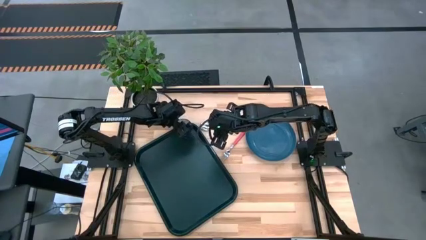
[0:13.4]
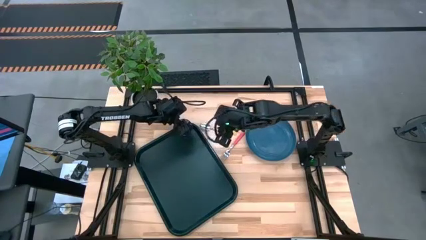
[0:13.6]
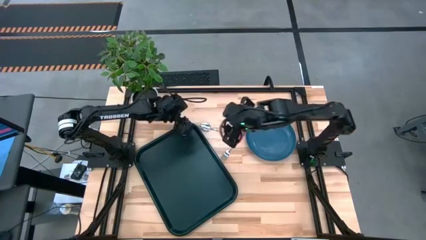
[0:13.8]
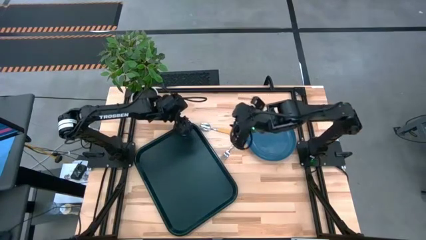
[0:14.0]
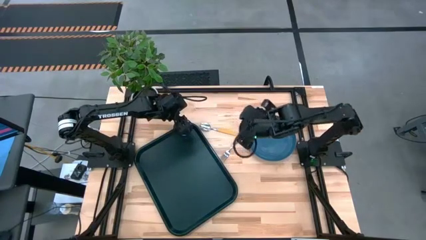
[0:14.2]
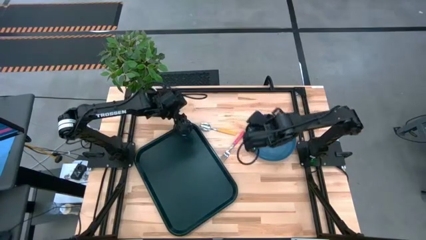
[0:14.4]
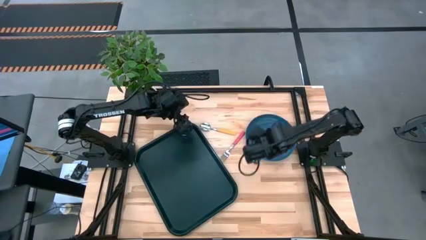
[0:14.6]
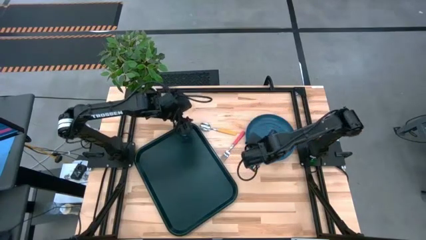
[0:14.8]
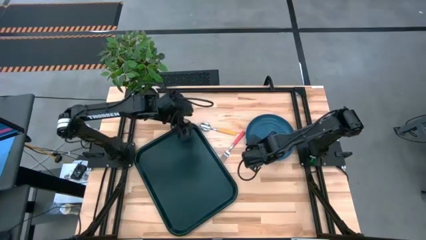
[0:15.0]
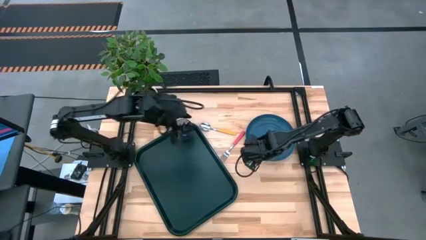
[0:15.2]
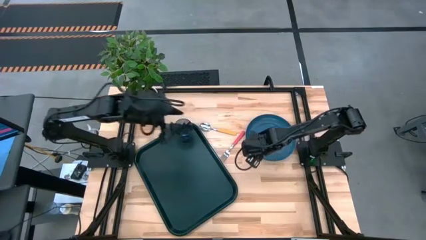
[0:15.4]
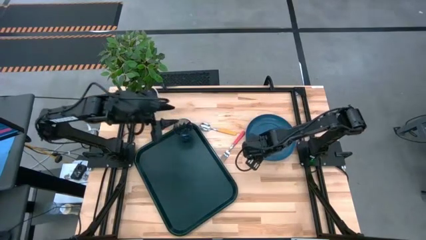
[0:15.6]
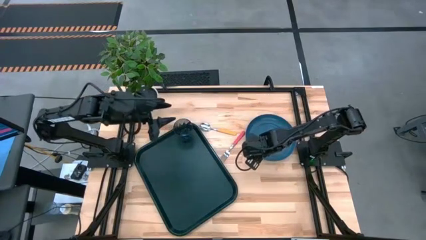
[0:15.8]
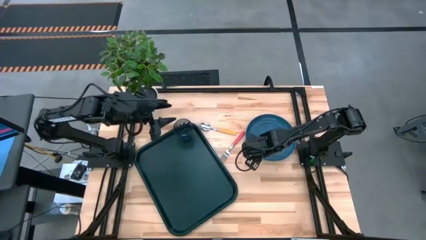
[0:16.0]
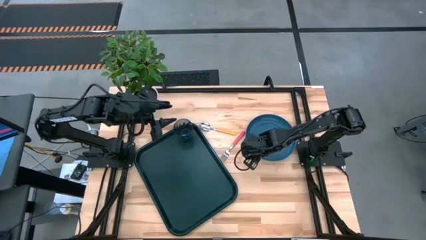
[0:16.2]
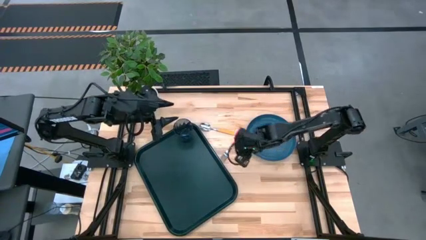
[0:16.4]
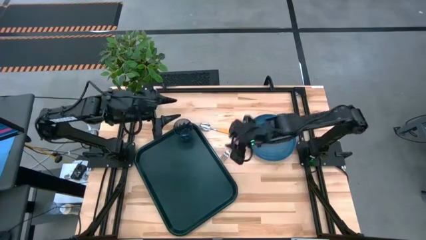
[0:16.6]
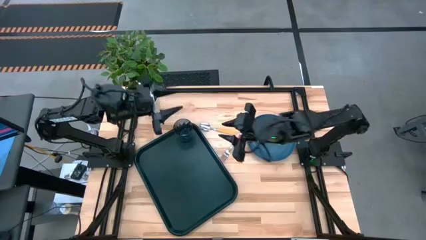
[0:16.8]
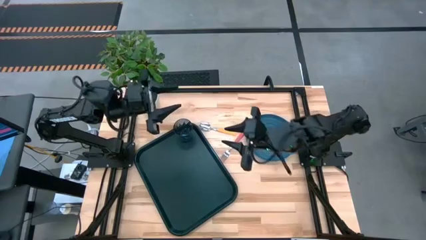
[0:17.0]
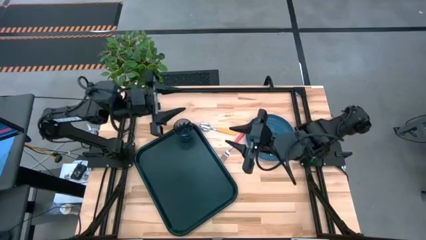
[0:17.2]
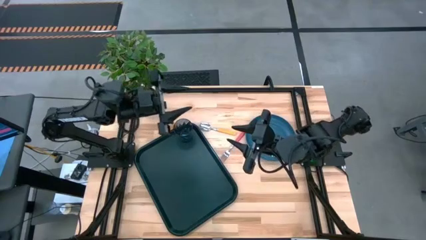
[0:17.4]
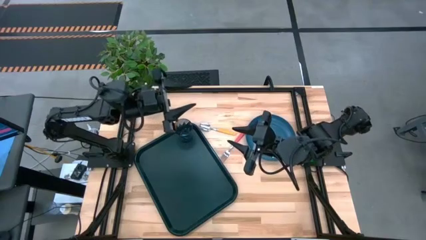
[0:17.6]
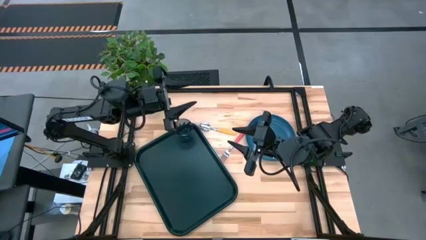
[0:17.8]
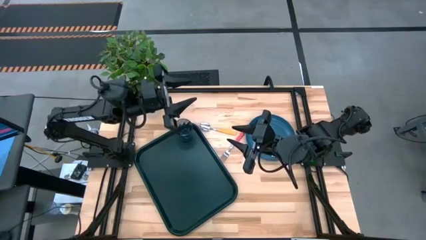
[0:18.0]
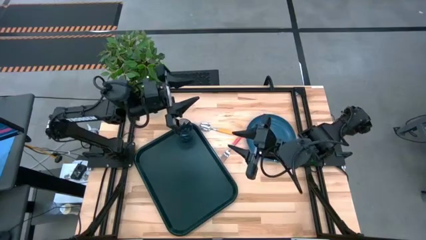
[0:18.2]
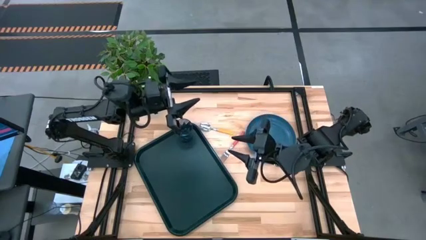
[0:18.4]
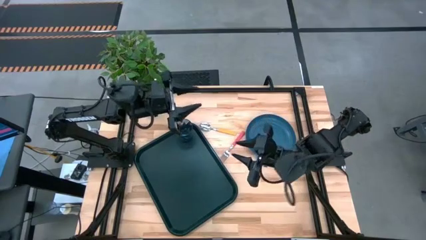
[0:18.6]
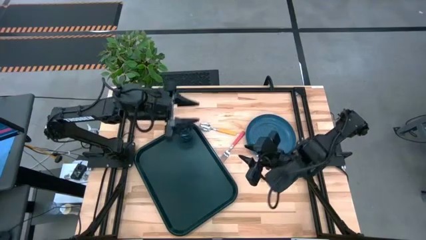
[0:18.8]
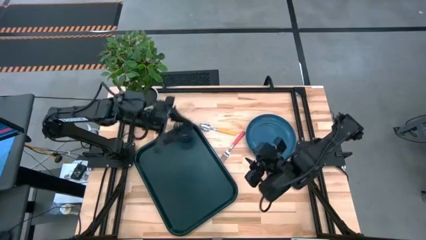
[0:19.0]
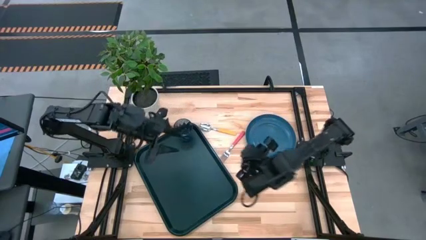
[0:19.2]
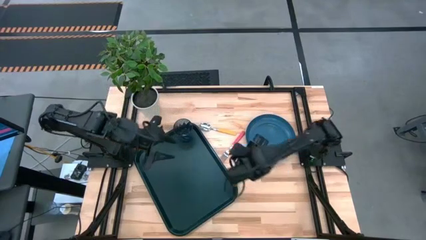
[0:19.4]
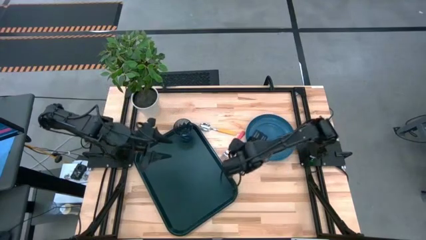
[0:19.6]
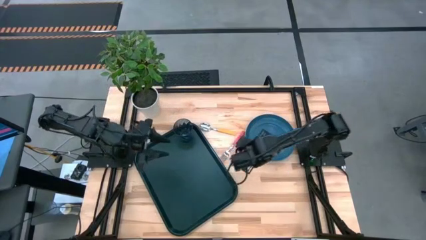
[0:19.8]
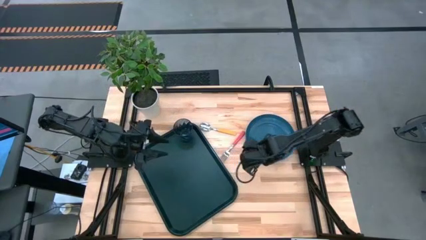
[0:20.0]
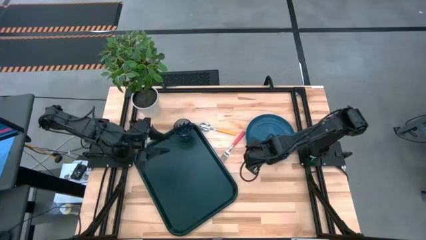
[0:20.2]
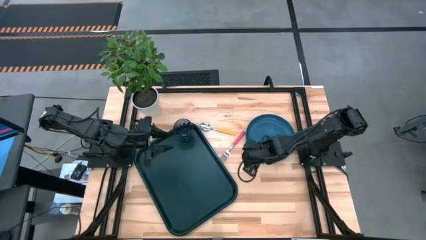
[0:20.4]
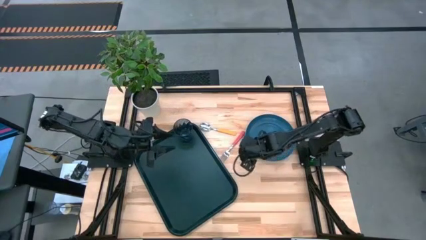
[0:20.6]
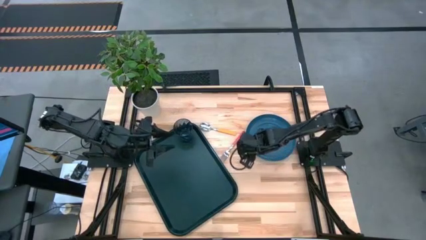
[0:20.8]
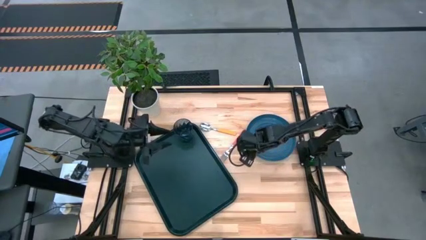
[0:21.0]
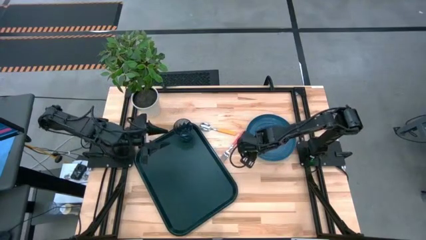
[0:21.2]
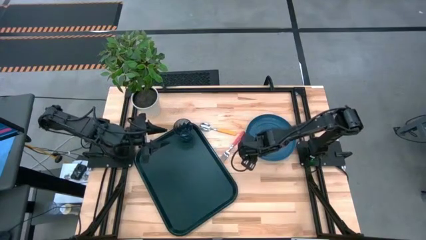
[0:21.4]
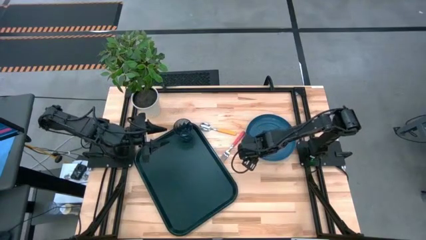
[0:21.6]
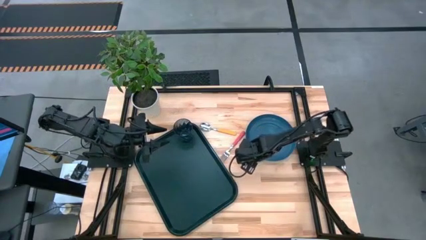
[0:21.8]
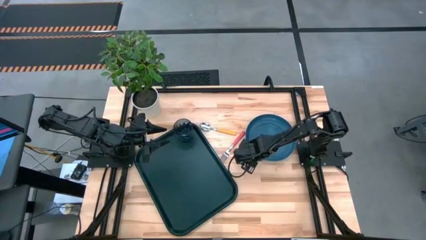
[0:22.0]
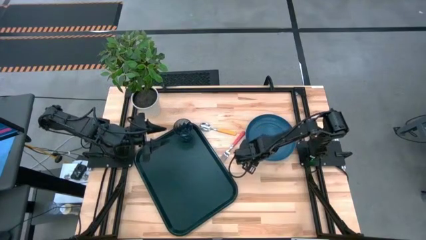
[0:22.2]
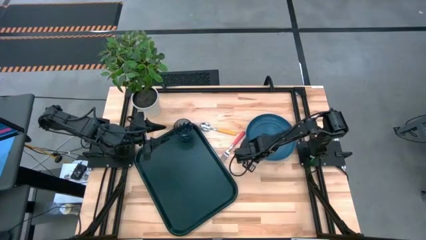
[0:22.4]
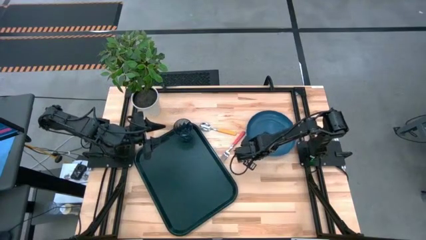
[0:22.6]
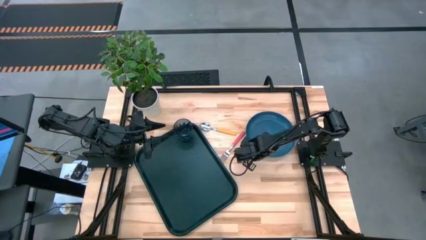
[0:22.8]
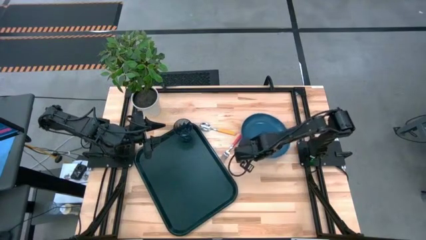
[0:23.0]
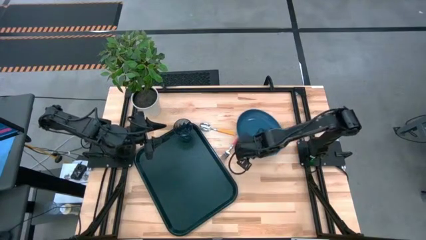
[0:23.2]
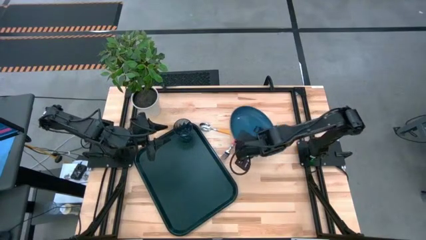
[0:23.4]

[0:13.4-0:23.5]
Task: Pick and place plate/cup/fork/spoon on tray
Put the blue plate on the black tray at the bottom of the blue cup

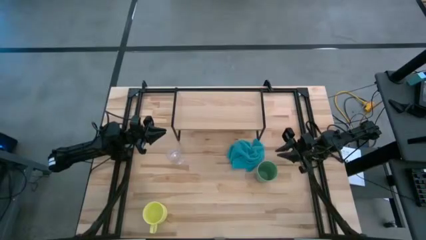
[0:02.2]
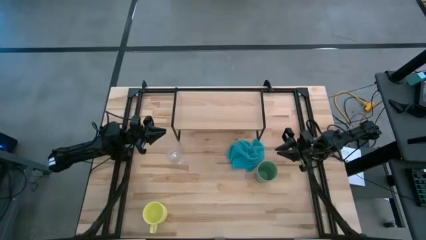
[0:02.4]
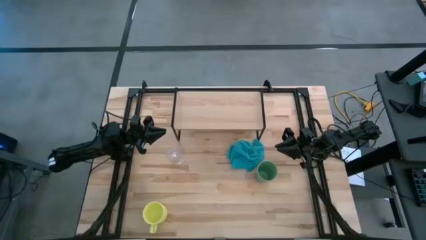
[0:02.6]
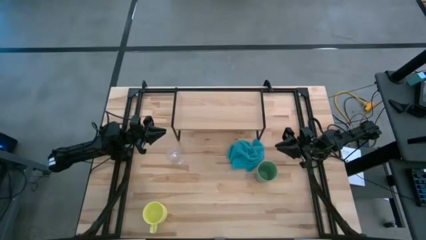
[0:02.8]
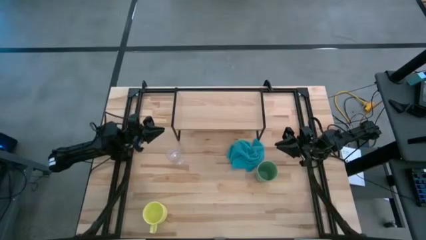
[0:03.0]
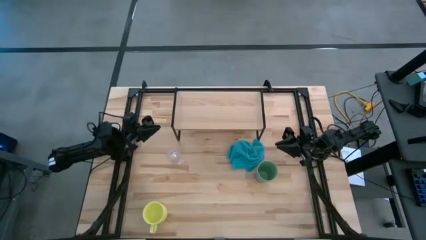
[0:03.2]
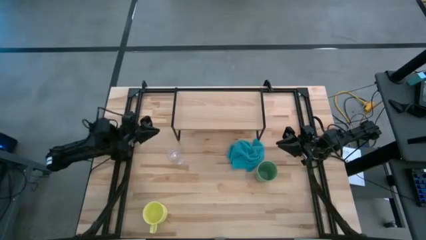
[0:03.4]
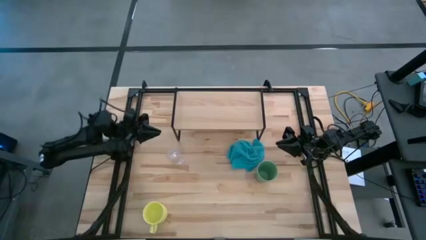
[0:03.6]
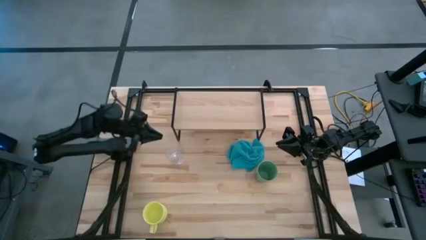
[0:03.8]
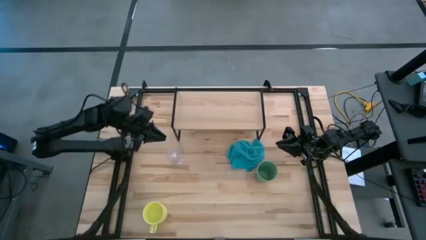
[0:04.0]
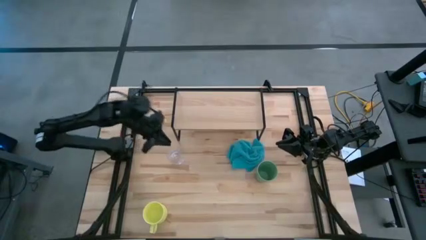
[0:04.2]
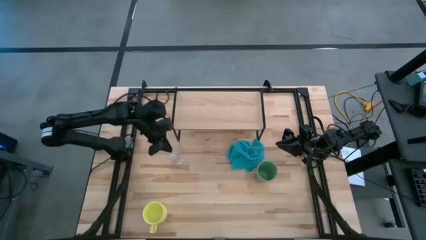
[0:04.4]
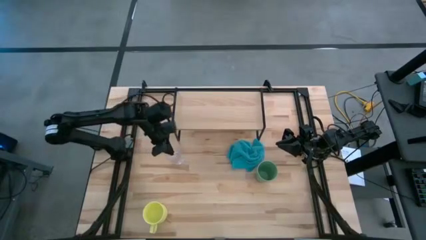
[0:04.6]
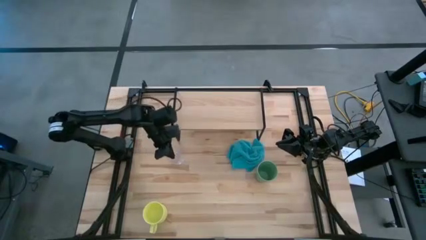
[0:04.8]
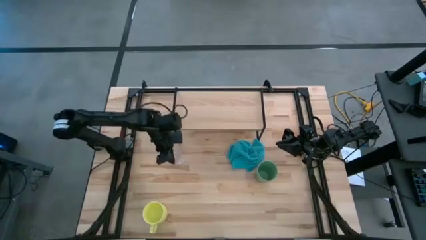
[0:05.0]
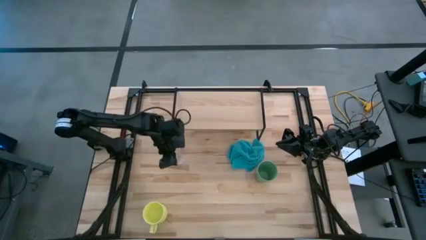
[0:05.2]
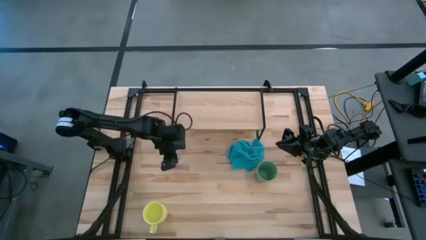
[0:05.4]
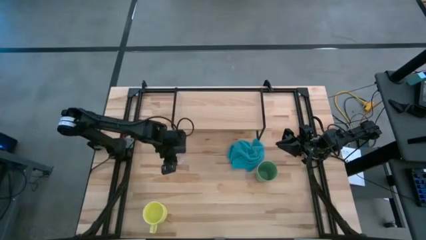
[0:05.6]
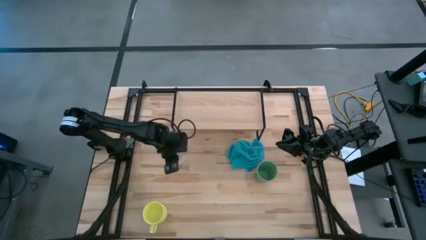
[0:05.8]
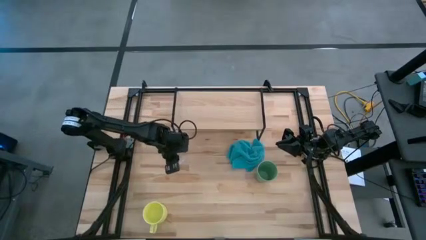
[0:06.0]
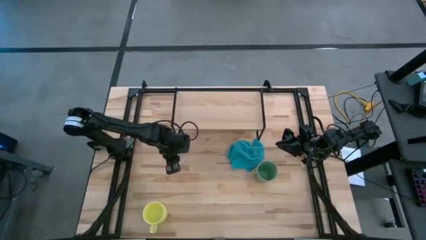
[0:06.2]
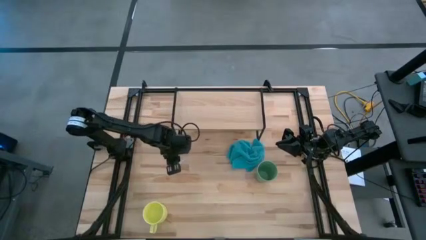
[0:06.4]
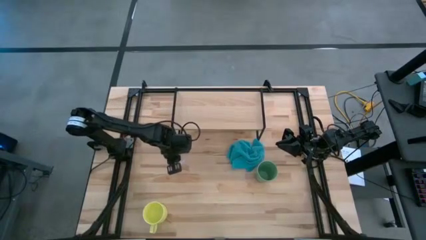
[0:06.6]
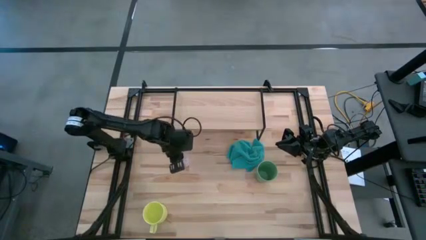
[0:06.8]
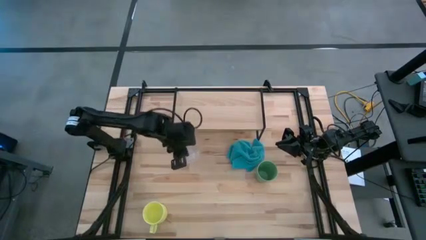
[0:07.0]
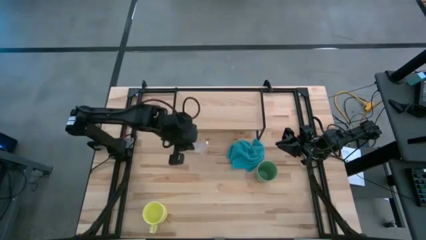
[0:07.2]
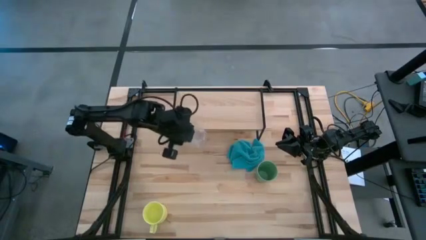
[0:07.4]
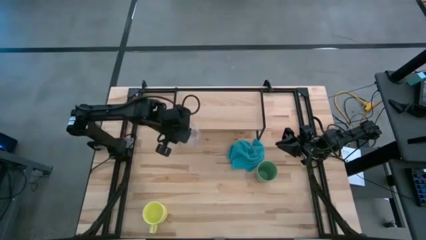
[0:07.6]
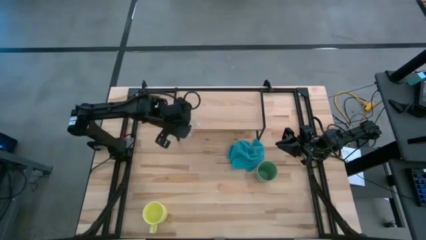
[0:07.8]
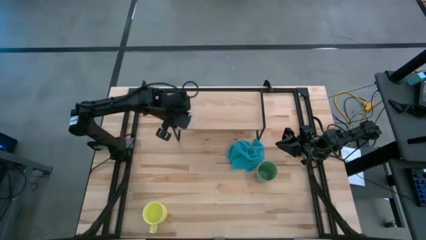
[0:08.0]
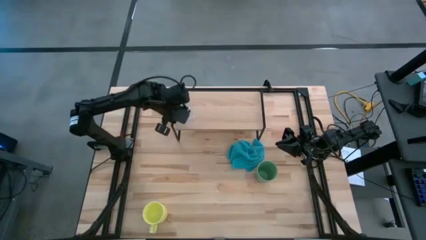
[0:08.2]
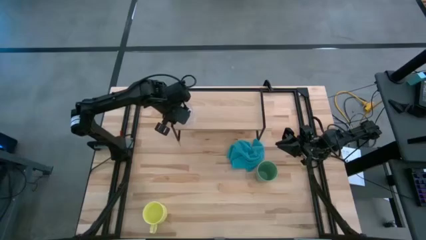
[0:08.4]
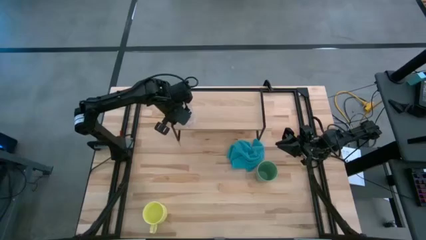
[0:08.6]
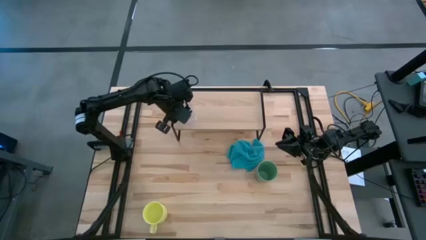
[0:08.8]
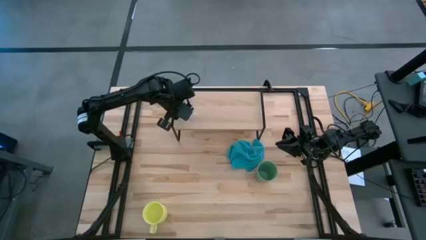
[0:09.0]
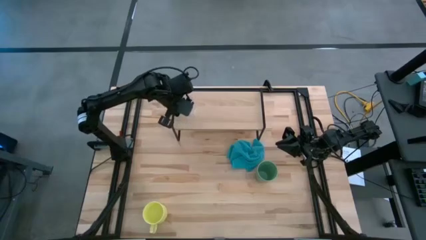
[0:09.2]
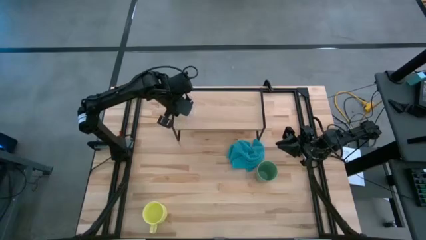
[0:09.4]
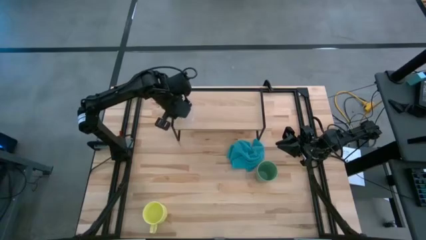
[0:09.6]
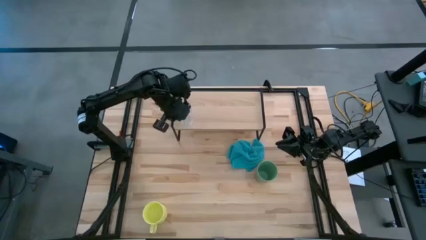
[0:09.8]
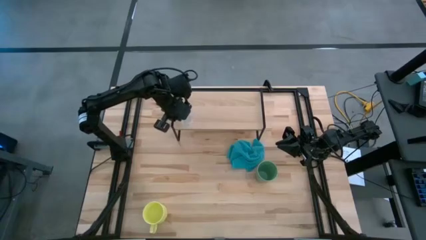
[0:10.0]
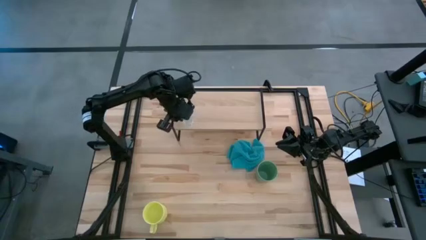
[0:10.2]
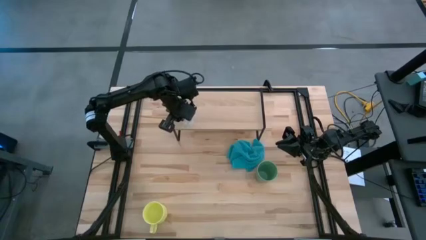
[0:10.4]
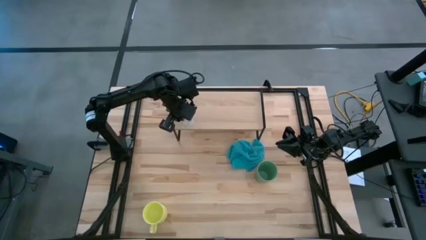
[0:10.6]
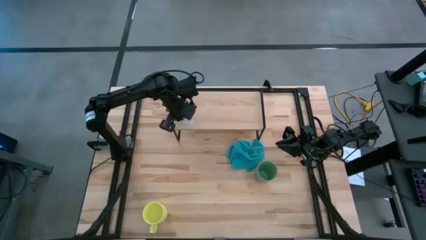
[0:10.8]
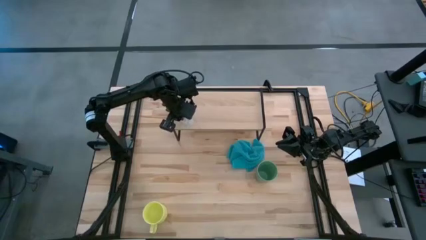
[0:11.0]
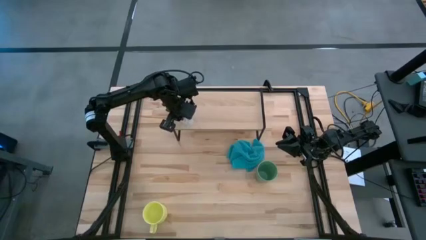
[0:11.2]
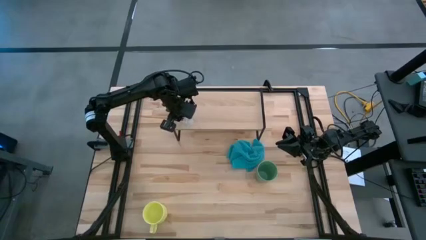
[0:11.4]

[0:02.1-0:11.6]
Task: Stack small to large cups/mugs on shelf
Put the transparent mug on the shelf
